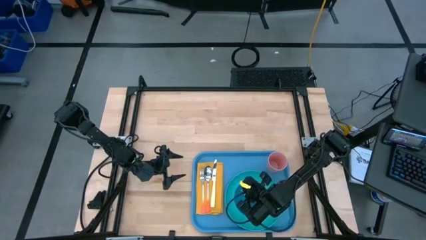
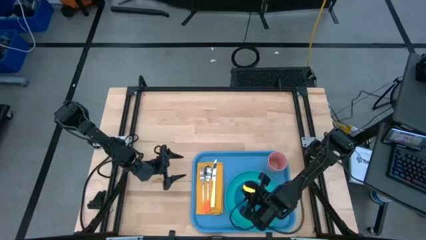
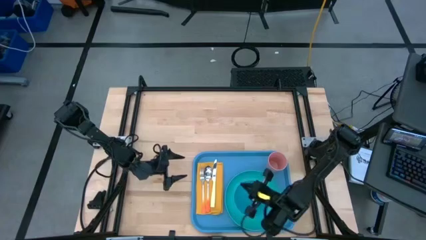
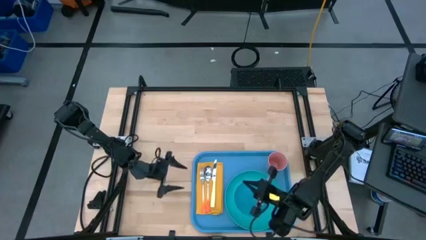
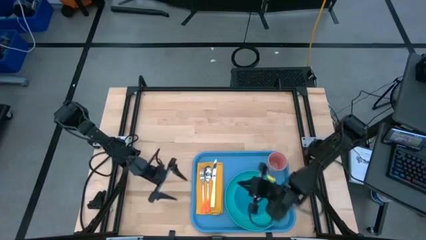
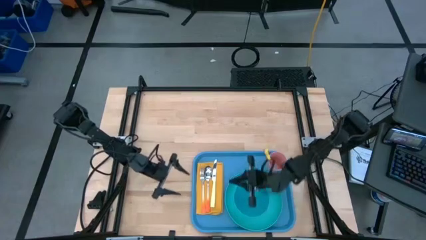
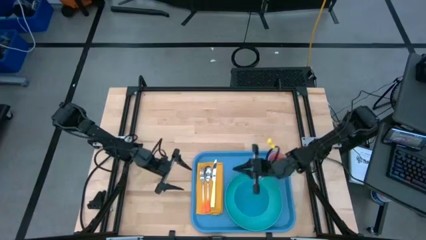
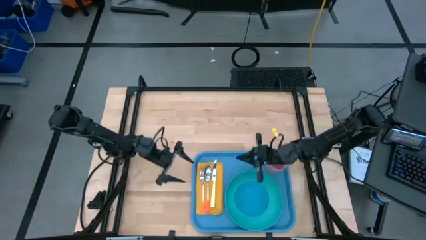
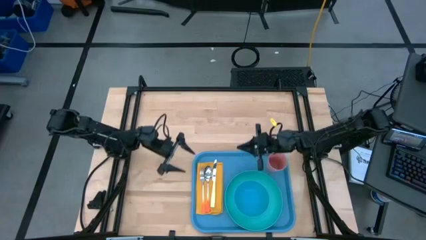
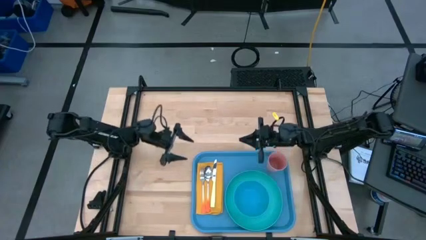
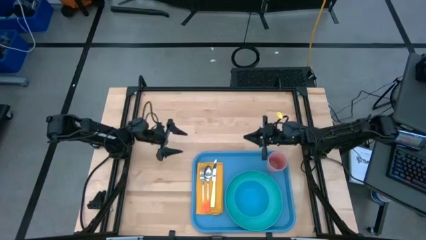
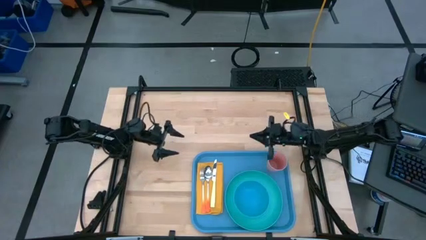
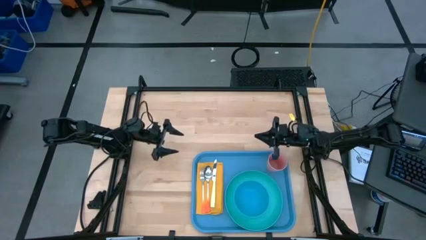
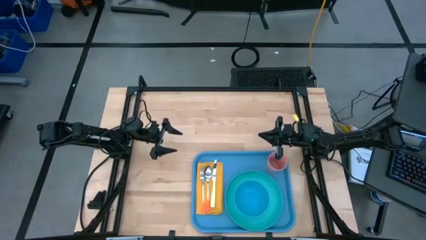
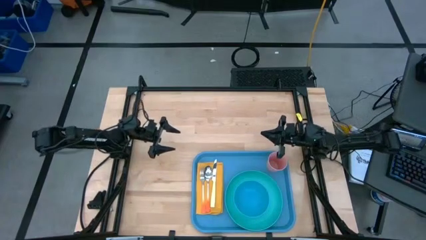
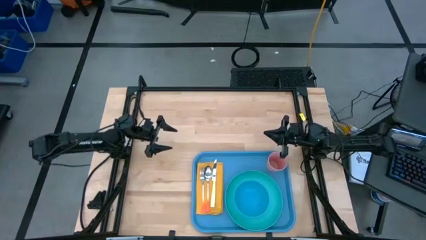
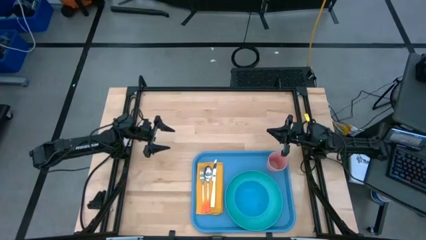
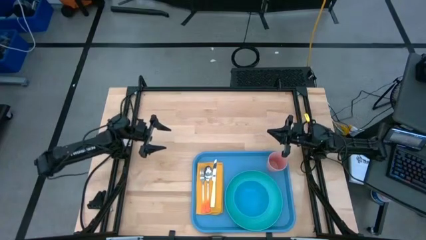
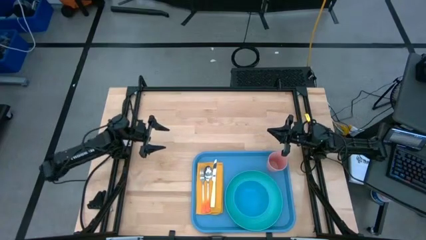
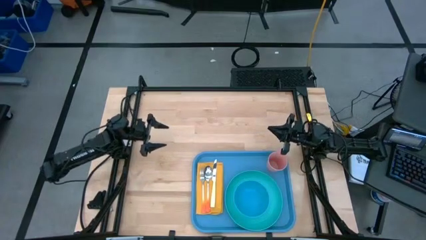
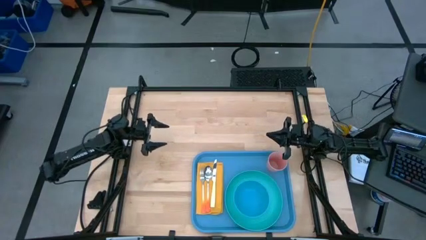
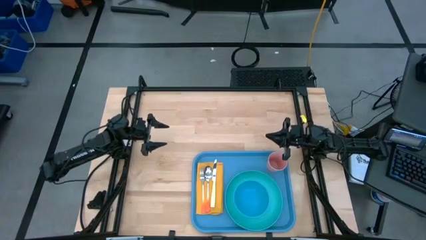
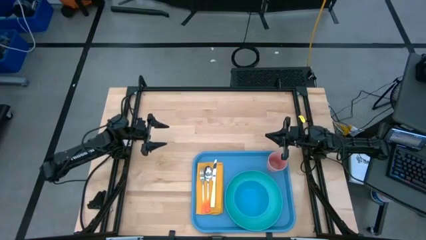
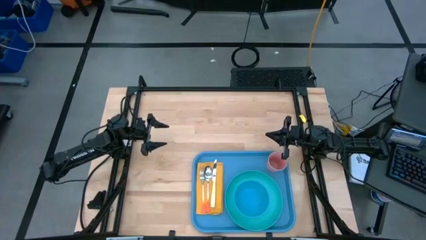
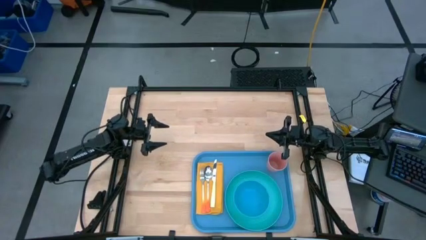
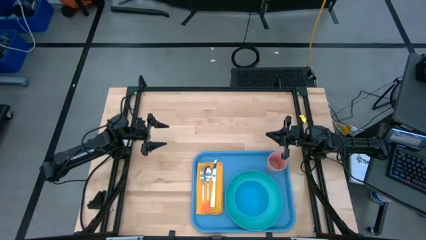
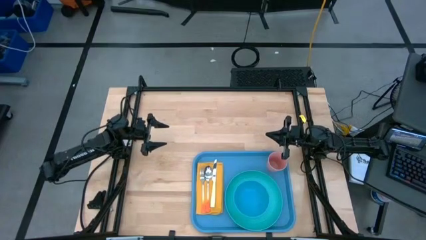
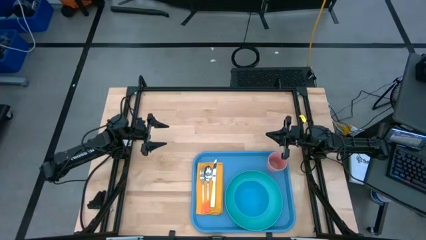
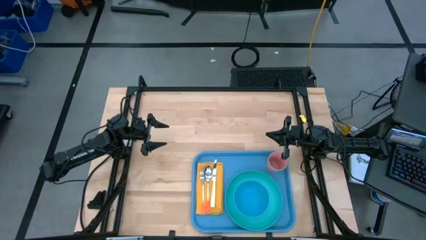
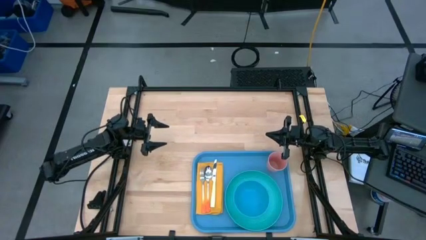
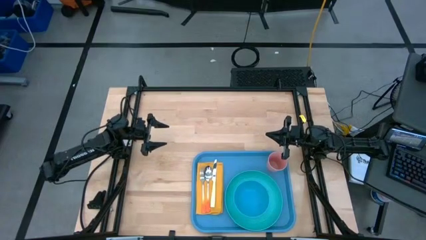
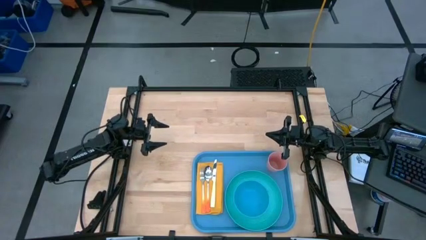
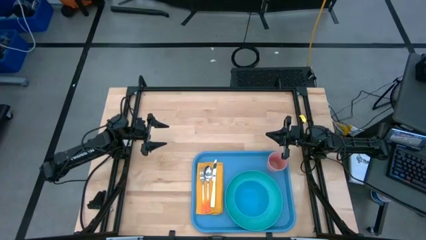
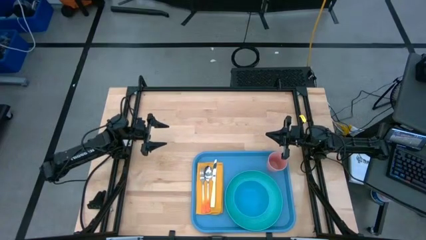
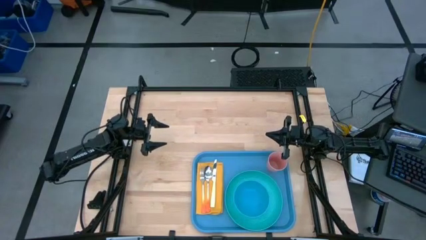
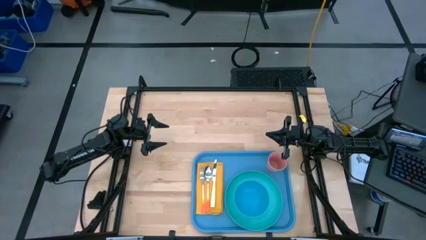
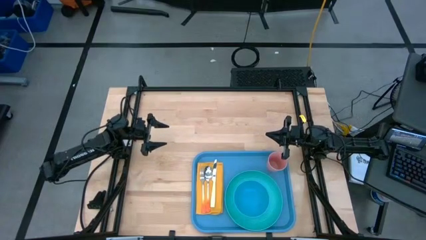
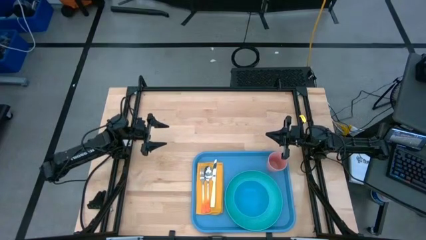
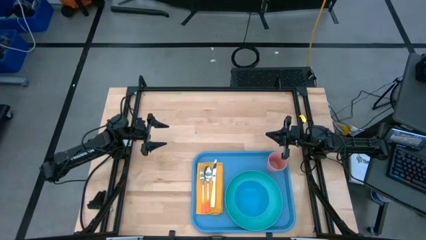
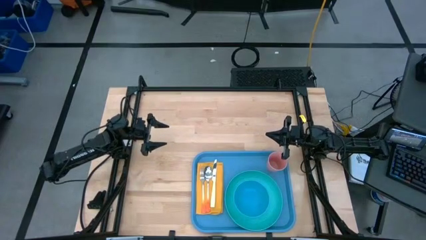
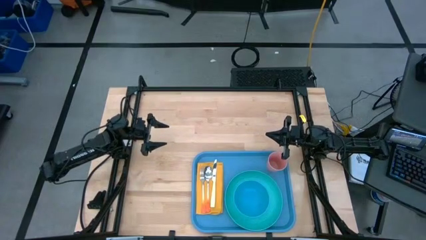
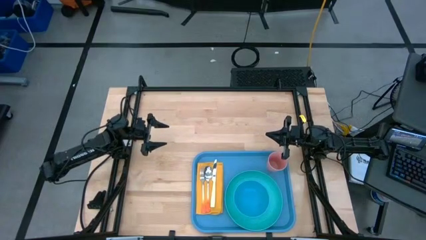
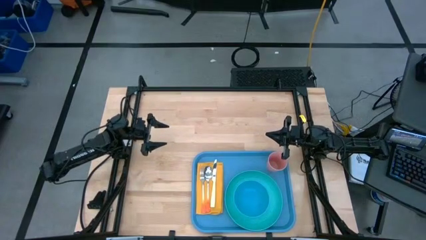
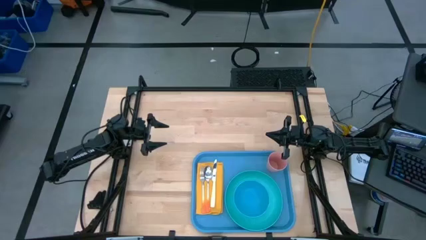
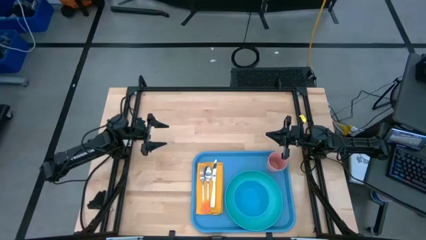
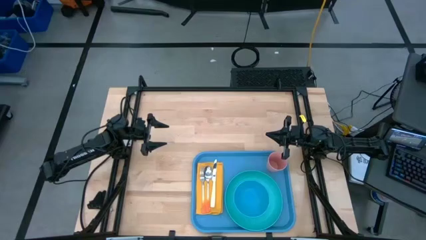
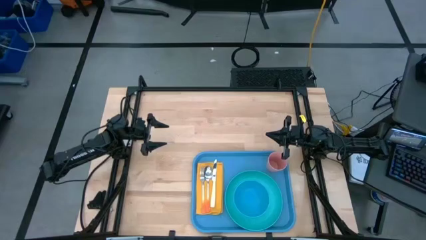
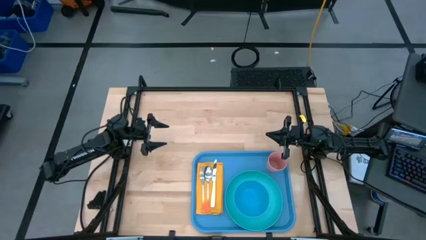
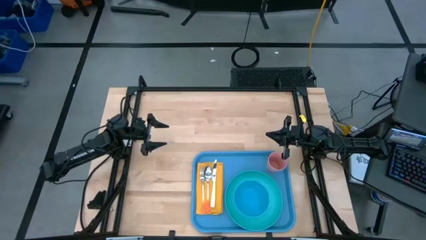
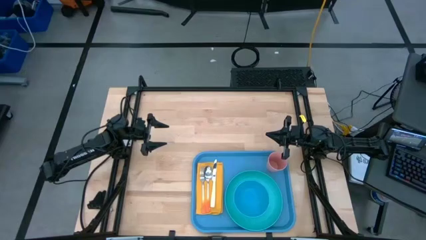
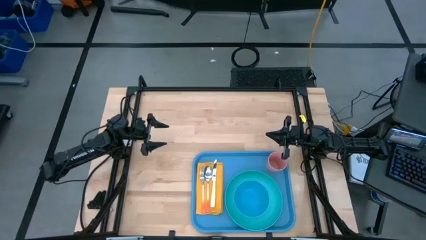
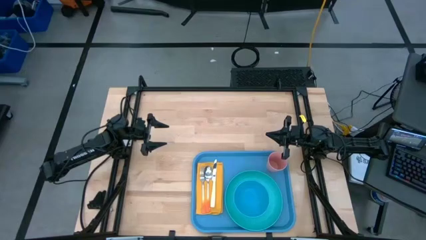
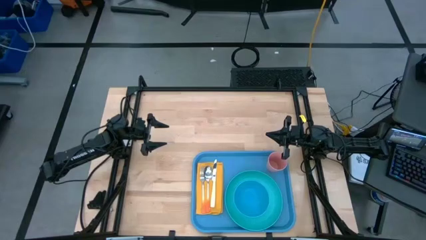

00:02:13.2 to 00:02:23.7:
Task: Set up tray
Return to Home Position

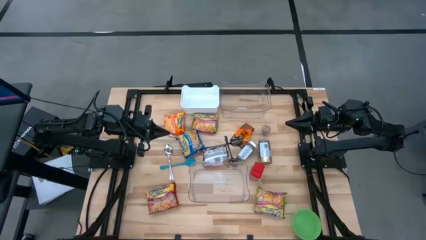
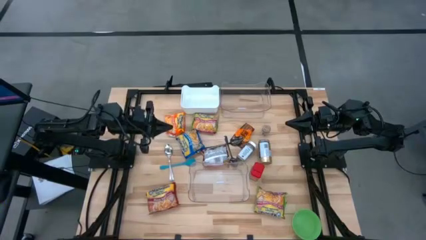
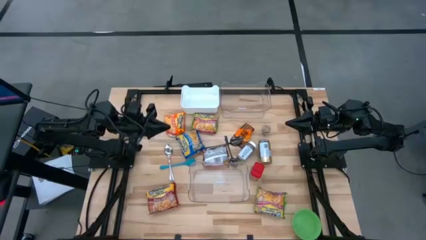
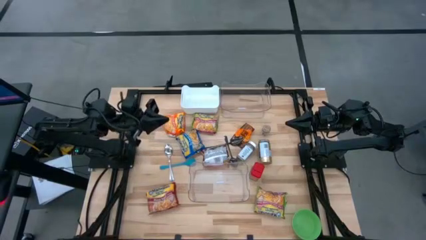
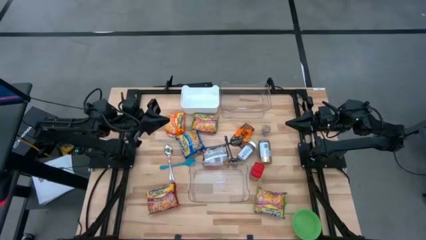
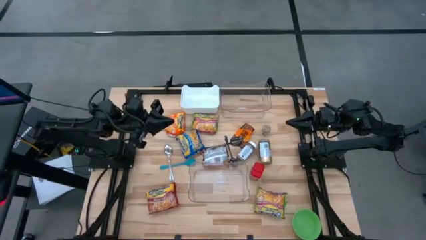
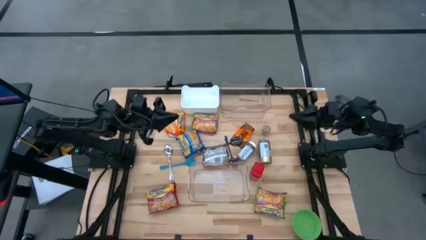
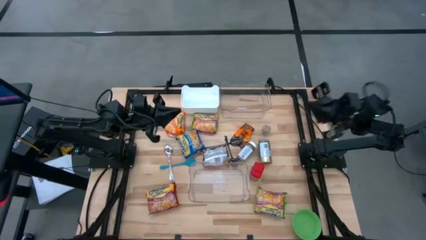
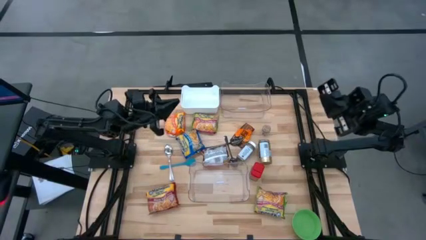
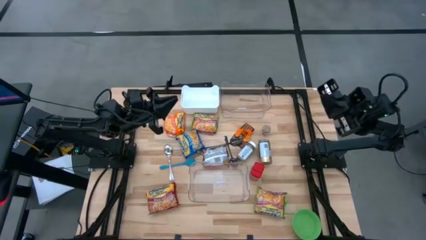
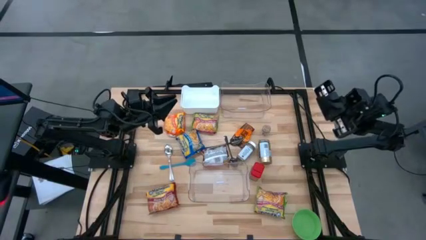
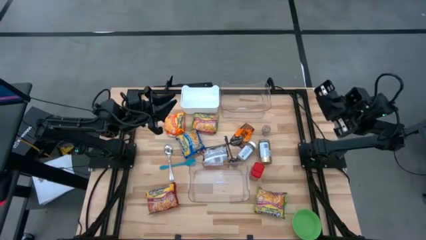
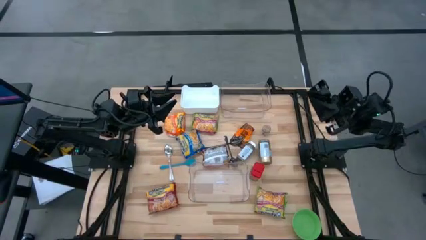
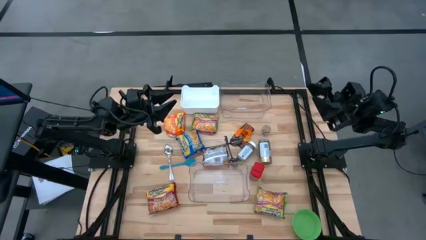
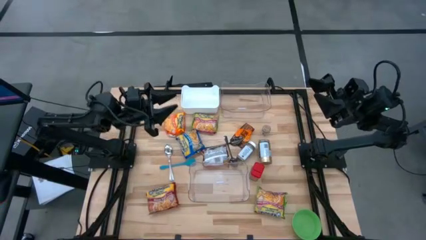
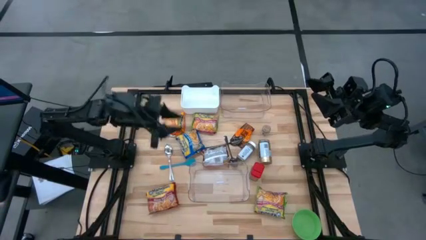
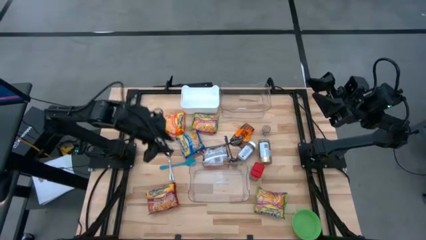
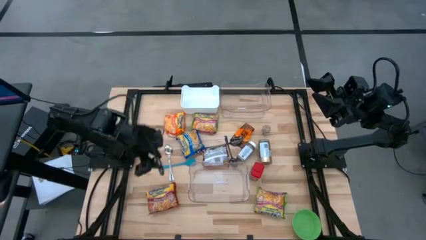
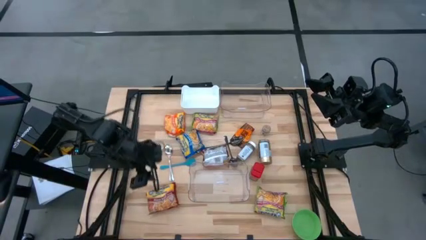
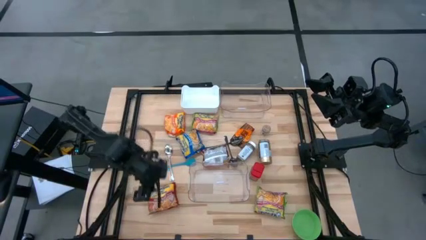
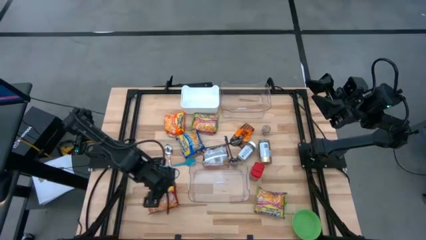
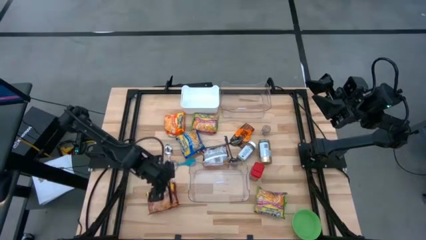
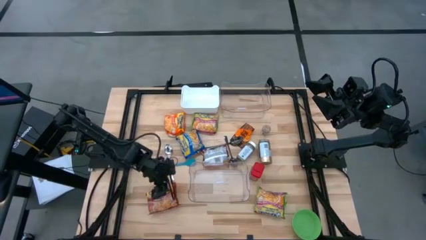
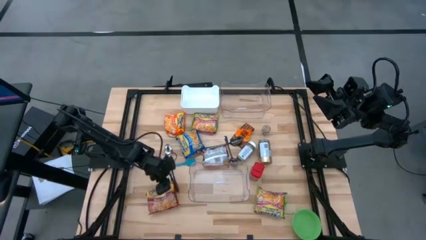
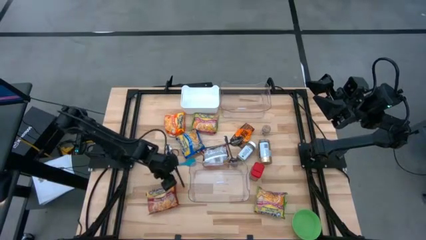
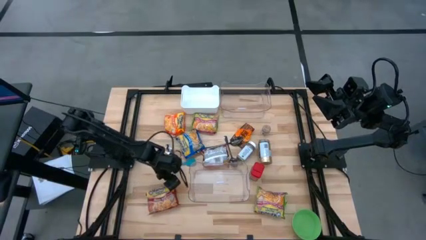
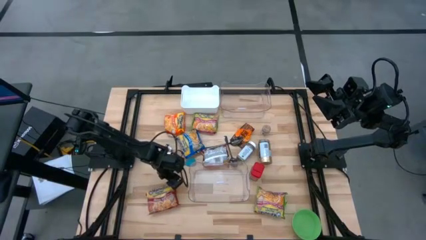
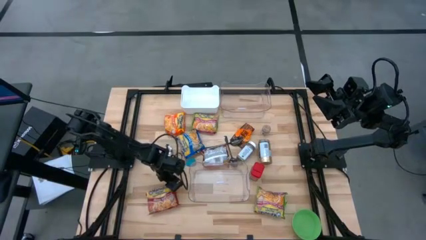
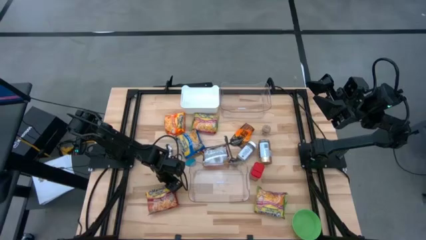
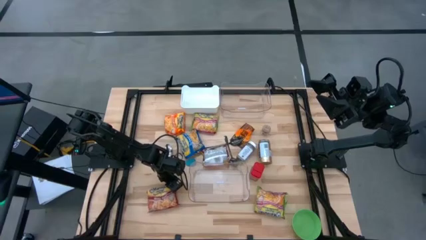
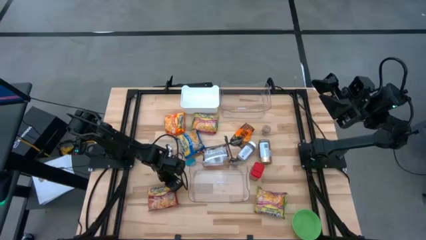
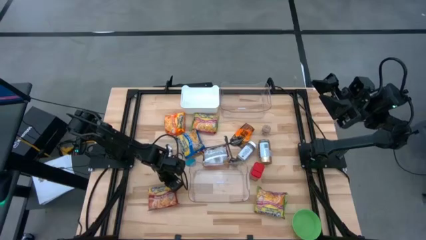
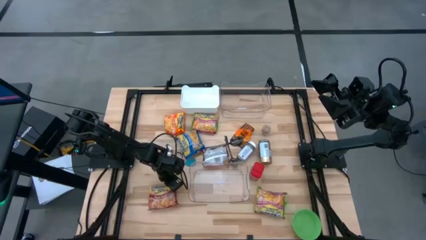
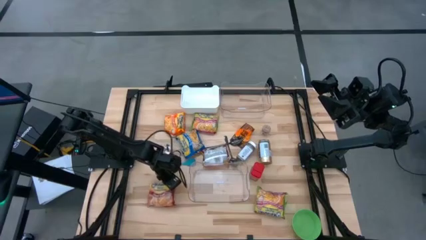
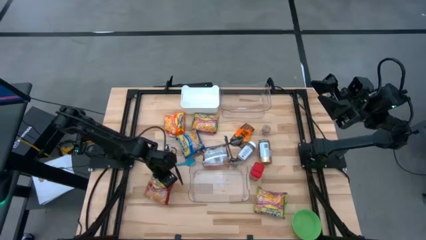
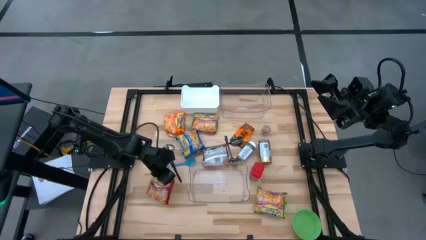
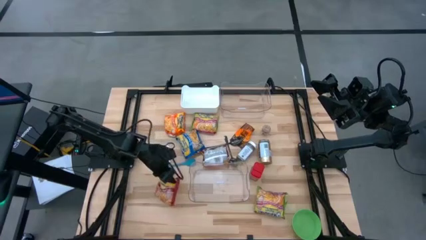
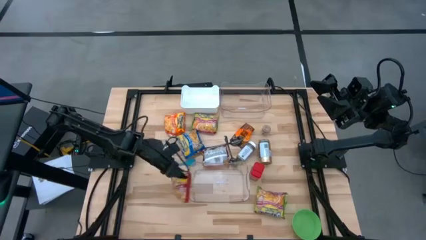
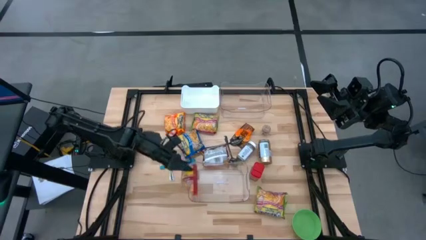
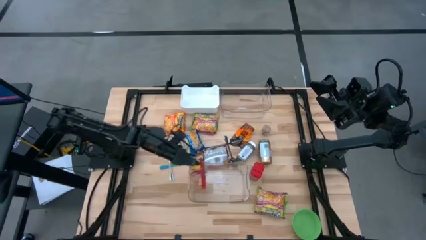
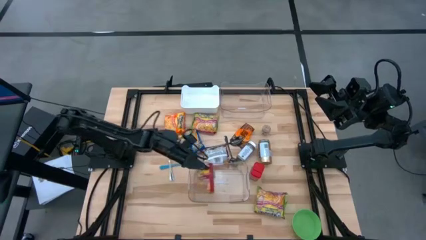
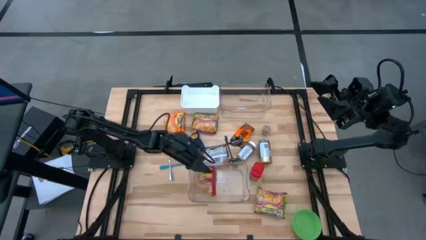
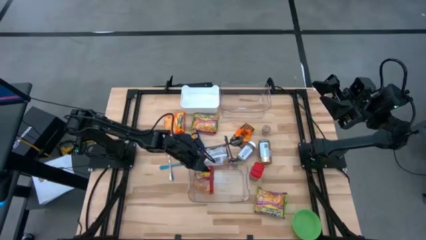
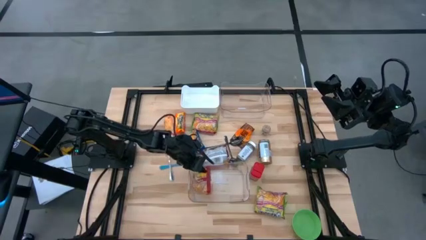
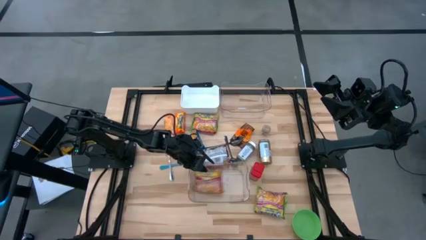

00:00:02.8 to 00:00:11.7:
Task: Pick & Place Food Item
Put the bottom red noodle pack into the bottom transparent bin
